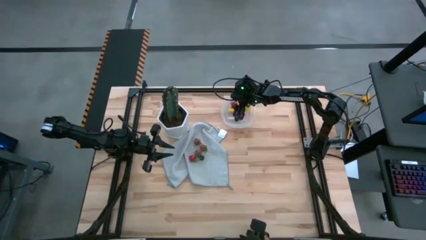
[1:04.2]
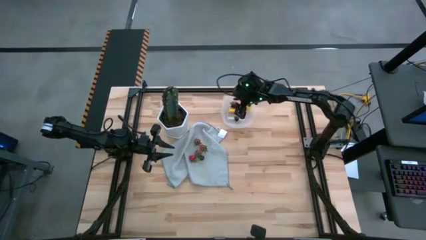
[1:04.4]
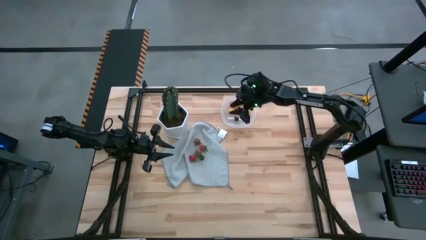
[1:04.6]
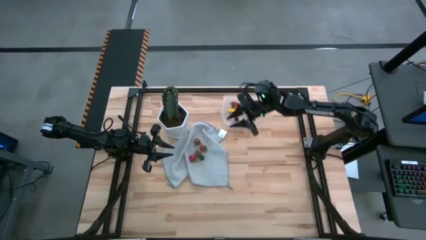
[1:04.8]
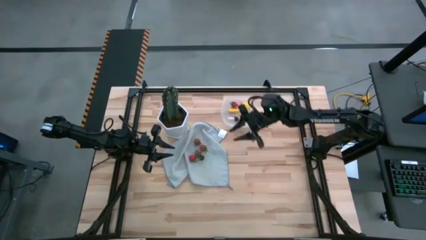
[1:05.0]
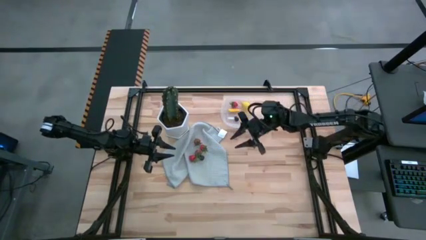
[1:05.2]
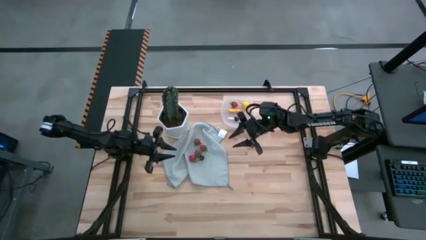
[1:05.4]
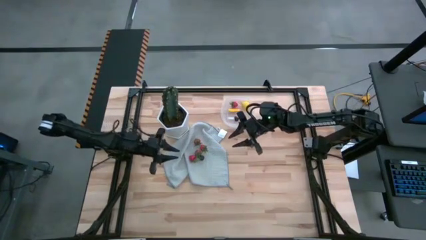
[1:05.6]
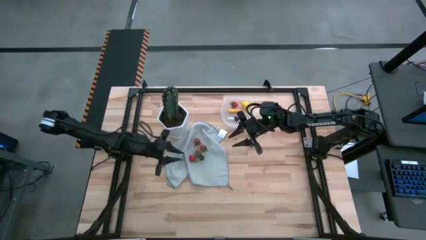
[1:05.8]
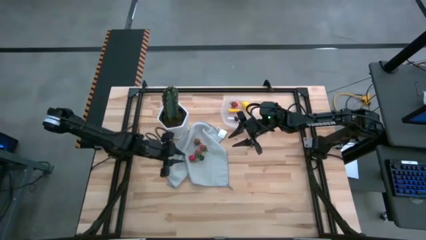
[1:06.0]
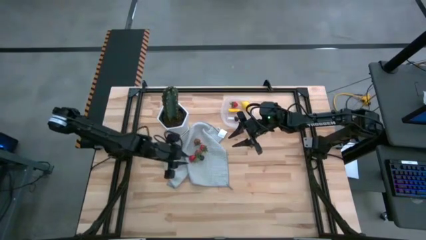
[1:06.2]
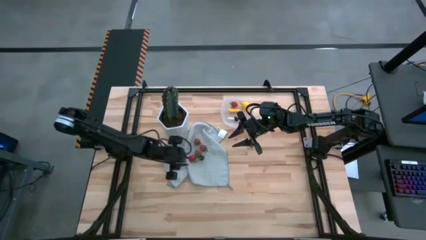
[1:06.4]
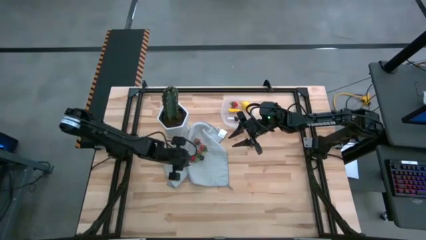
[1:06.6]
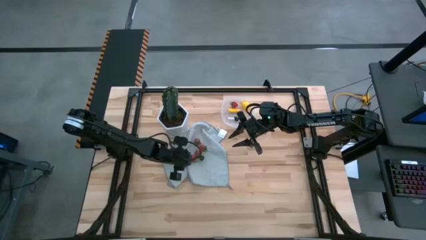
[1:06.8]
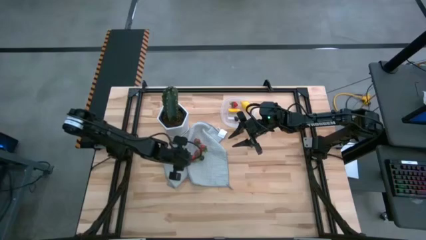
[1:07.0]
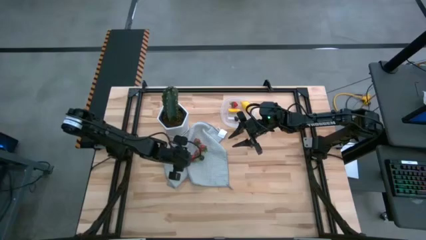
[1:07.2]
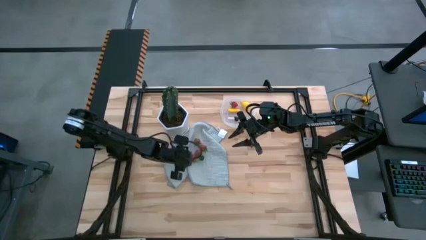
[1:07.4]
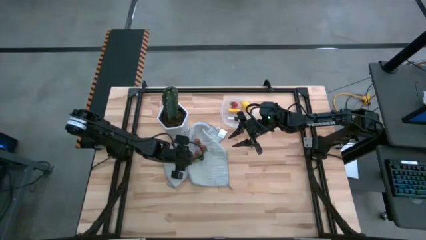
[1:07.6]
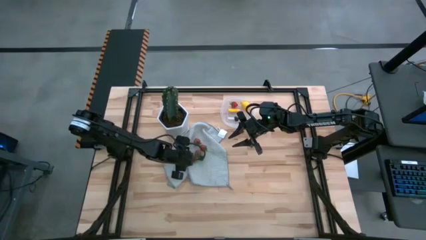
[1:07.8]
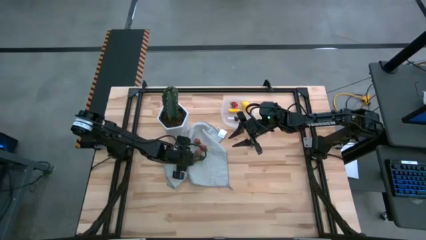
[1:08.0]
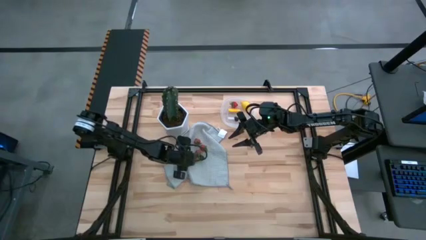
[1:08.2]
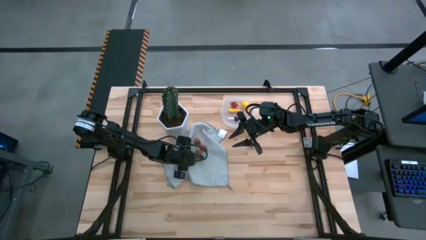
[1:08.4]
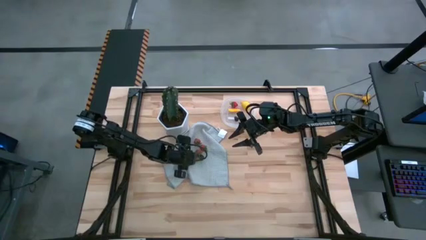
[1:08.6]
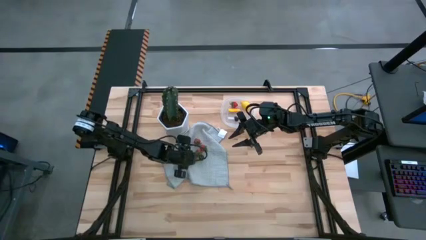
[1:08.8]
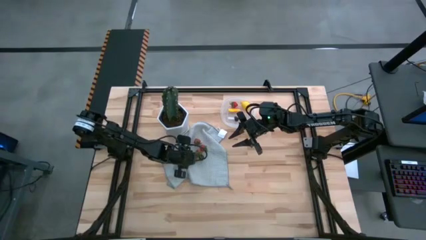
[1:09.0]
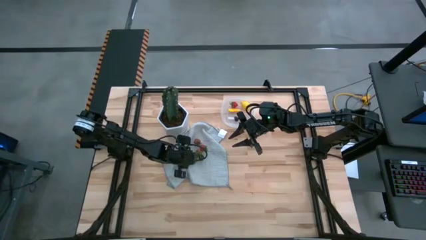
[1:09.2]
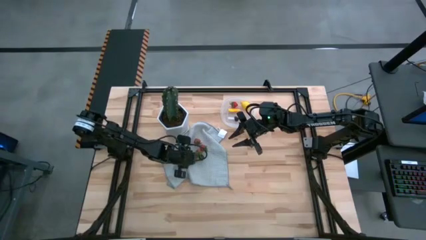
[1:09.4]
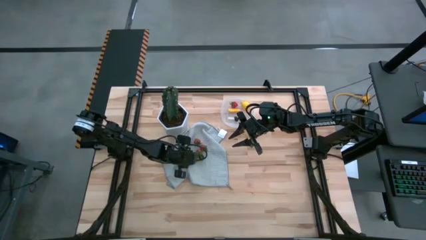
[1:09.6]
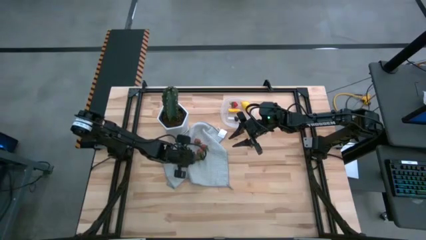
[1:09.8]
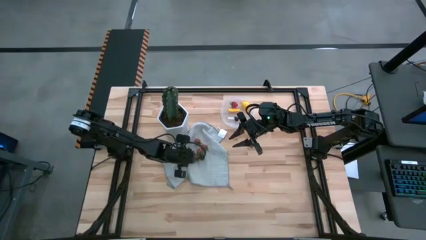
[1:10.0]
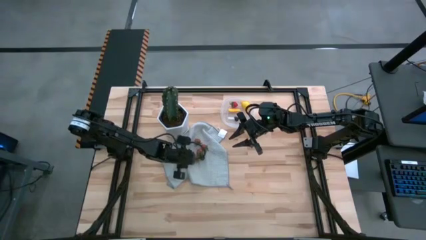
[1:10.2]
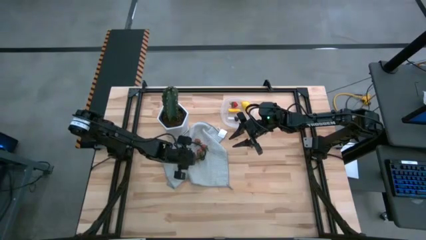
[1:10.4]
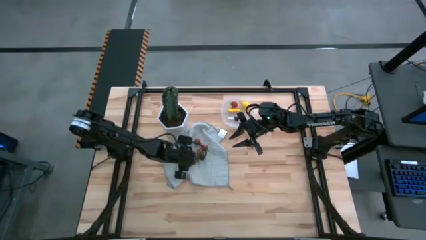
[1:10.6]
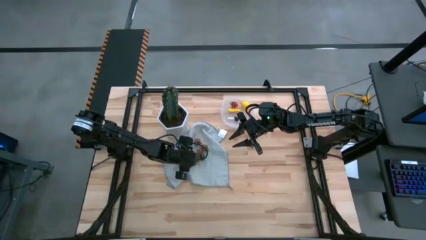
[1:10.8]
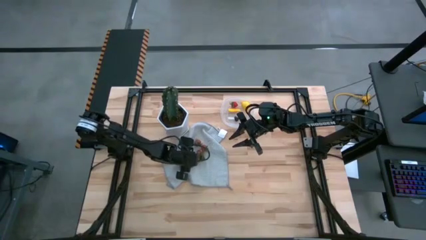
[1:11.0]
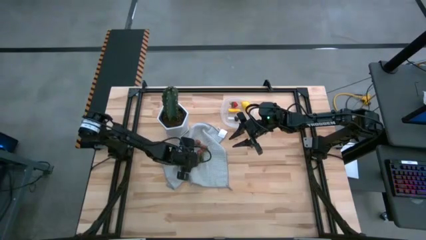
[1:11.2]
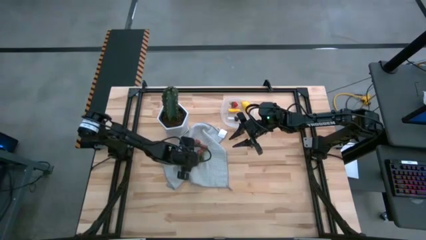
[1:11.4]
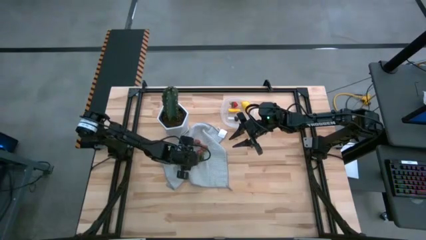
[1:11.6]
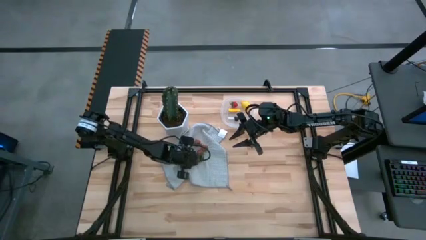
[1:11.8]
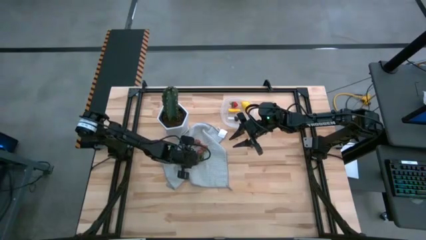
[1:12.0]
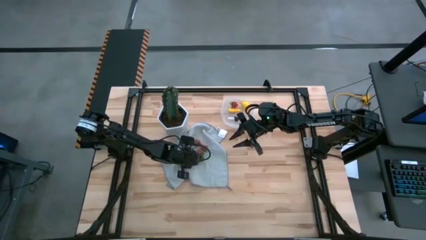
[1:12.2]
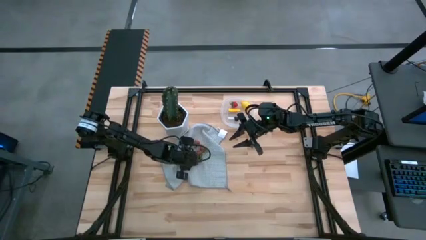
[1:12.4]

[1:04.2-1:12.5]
Task: Pick and placing Produce into tupperware
Put the red strawberry into the transparent bin

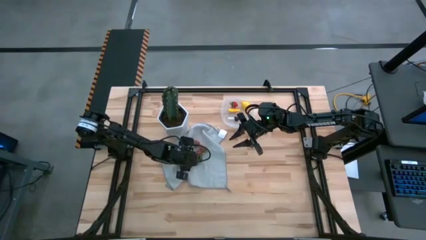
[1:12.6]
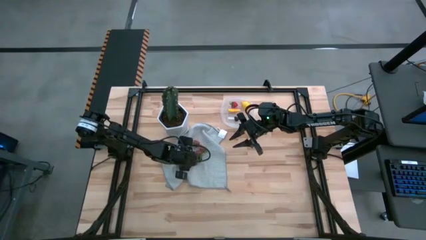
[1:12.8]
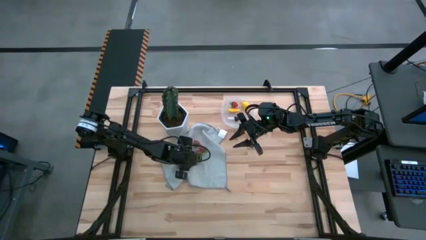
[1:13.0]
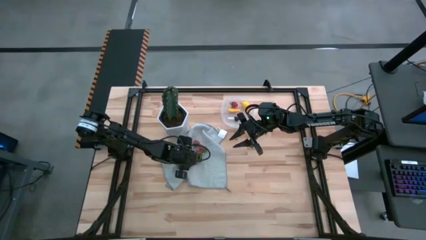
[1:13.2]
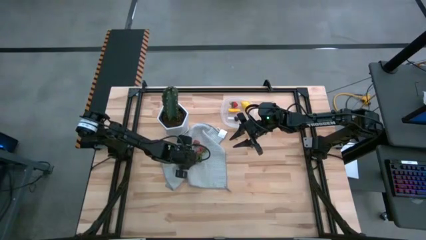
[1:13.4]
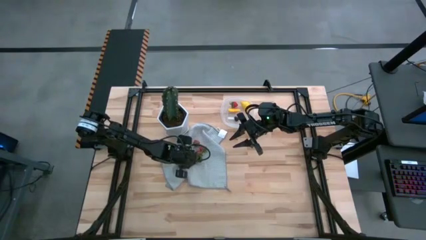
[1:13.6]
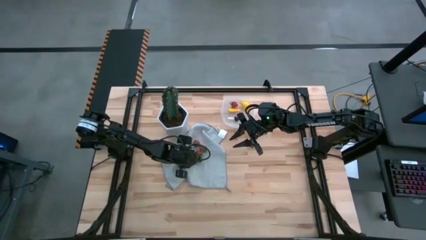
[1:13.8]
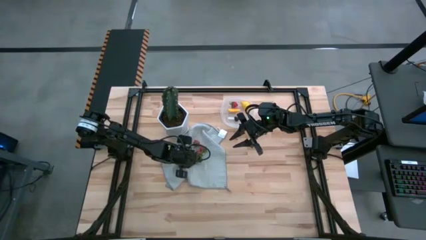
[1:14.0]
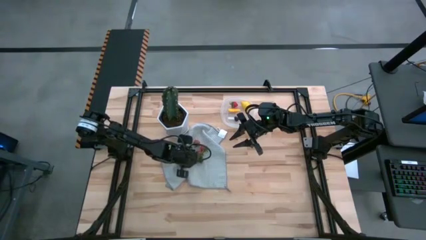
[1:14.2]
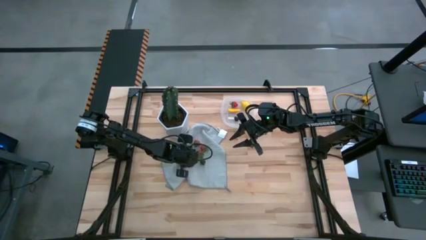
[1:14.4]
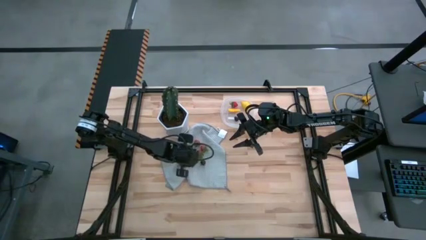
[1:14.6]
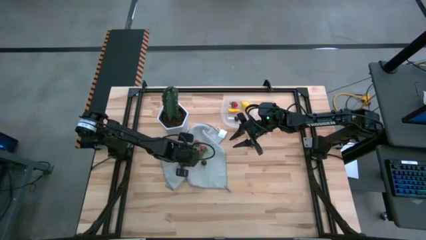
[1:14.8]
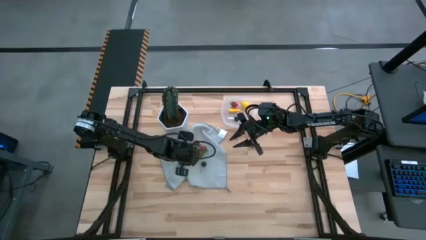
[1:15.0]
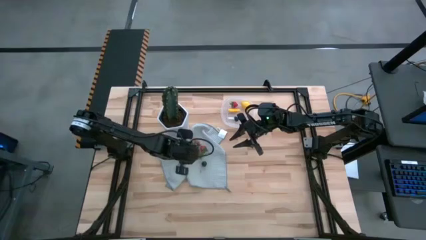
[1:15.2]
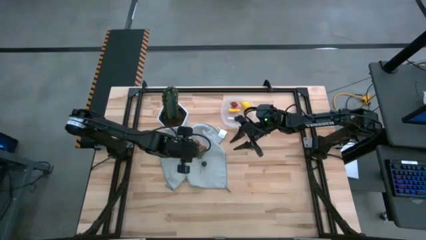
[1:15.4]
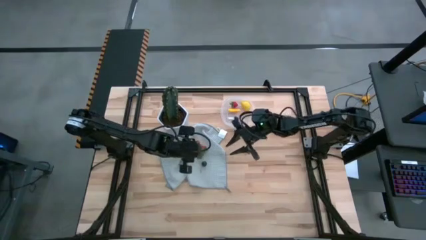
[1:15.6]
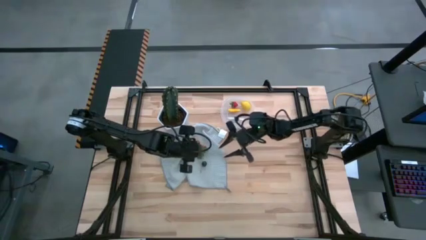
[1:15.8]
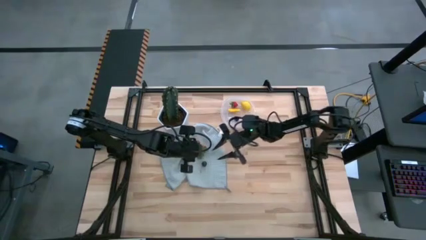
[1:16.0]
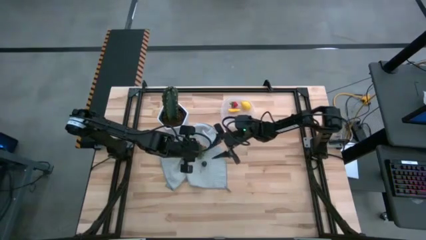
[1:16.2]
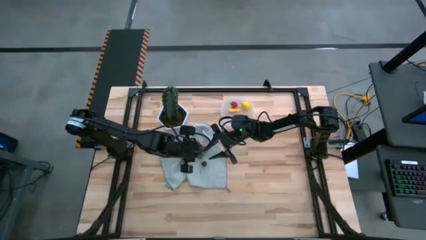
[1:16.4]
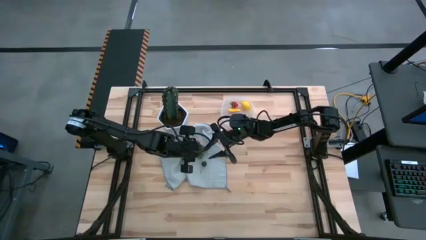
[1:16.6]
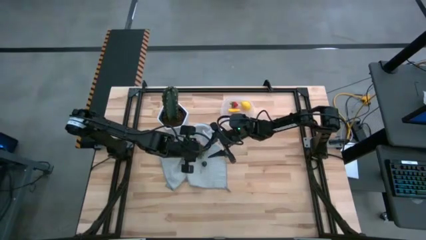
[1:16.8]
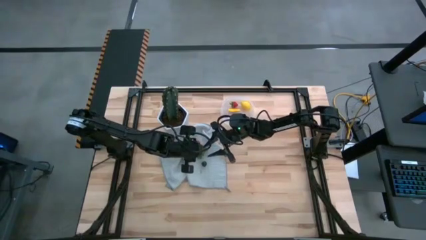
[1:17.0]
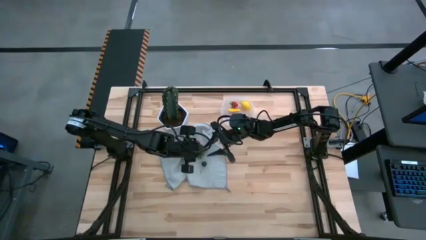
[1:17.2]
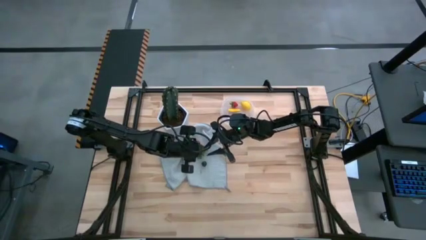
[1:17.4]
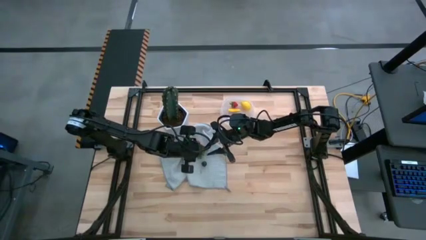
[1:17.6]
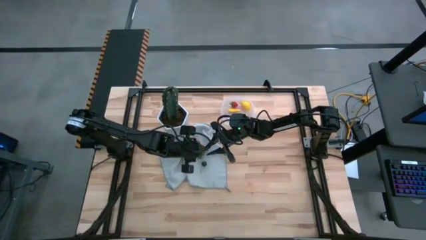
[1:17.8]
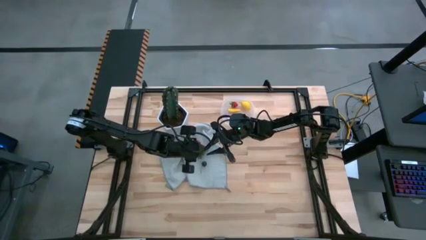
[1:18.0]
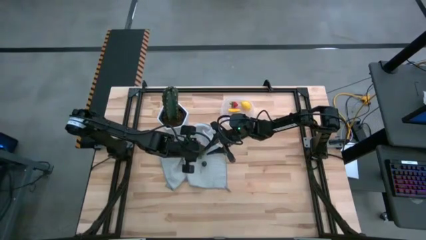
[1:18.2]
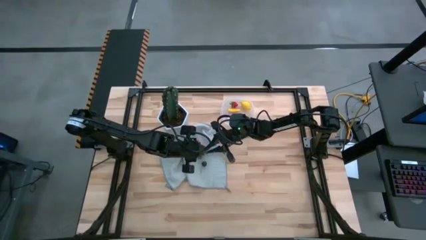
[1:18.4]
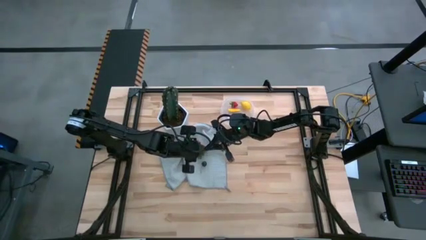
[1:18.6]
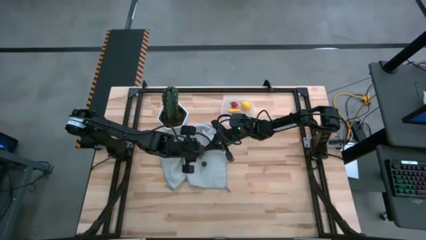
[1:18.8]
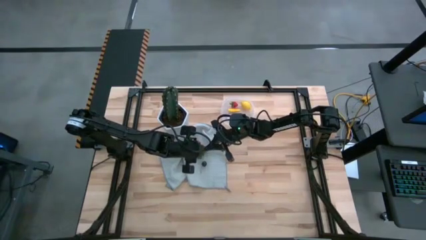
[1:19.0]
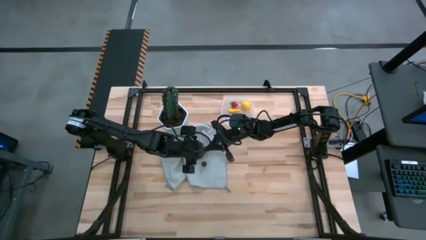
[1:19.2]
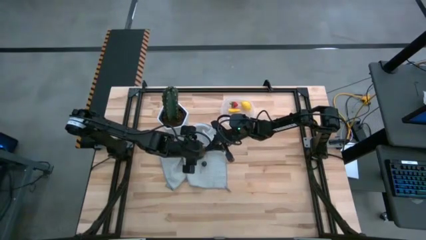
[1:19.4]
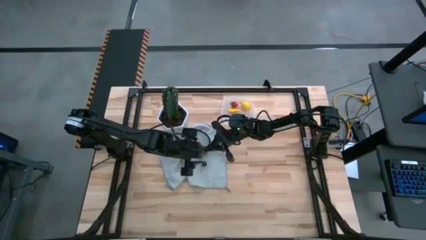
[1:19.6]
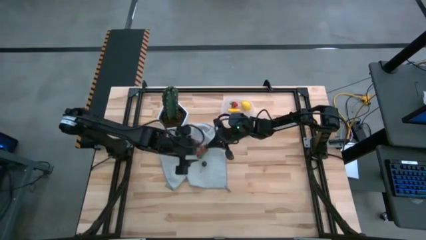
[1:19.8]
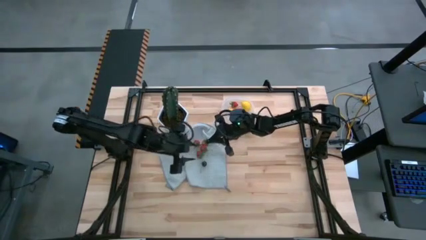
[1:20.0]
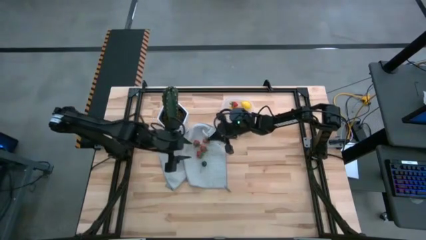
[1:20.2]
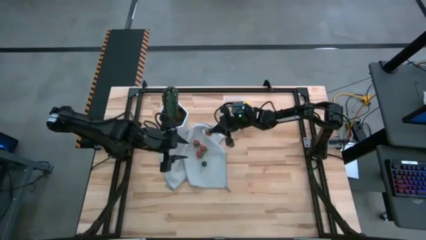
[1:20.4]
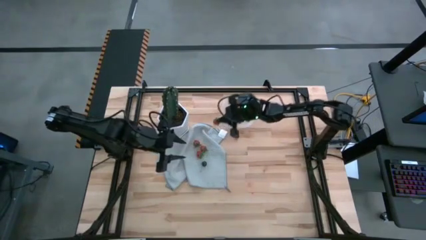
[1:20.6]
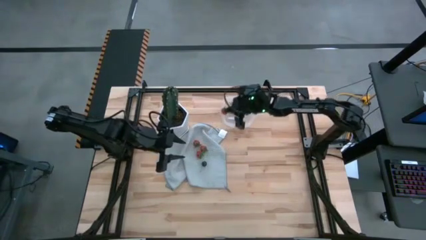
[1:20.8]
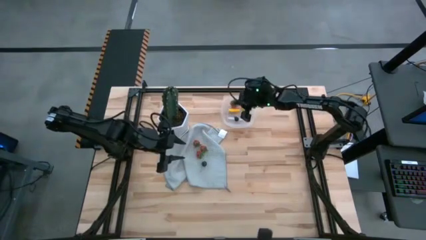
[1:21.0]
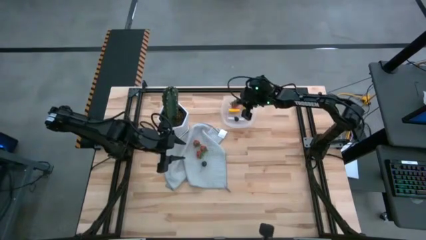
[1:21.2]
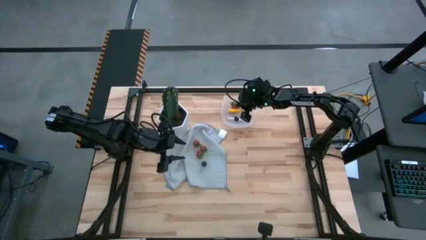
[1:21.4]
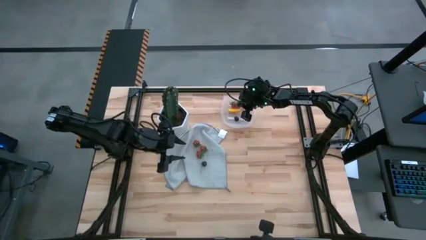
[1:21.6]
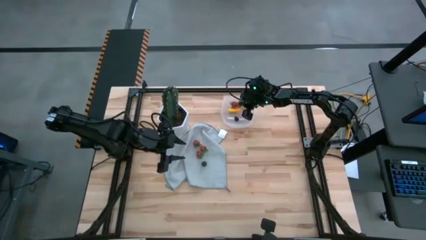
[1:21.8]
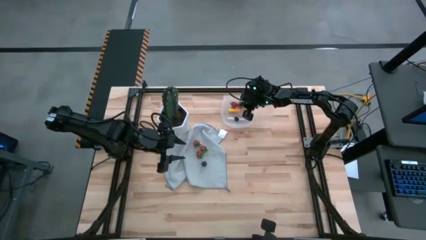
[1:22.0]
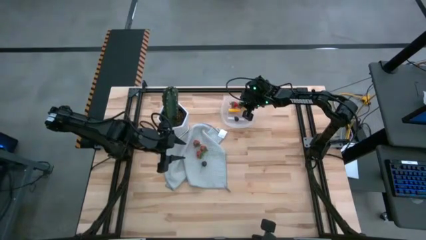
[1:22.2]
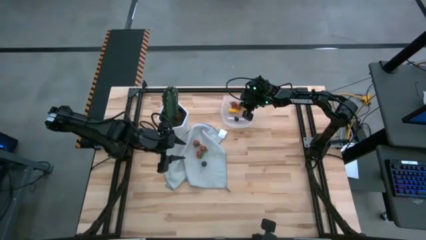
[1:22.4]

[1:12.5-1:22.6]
Put the red strawberry into the transparent bin
